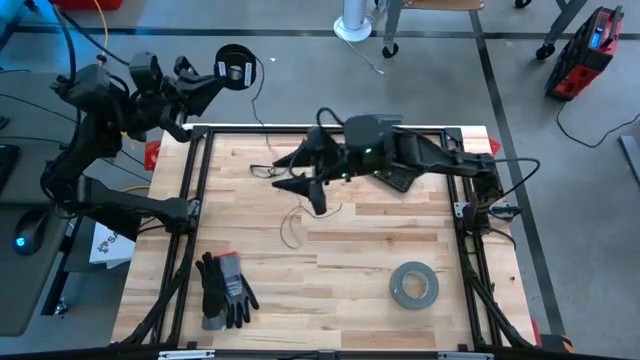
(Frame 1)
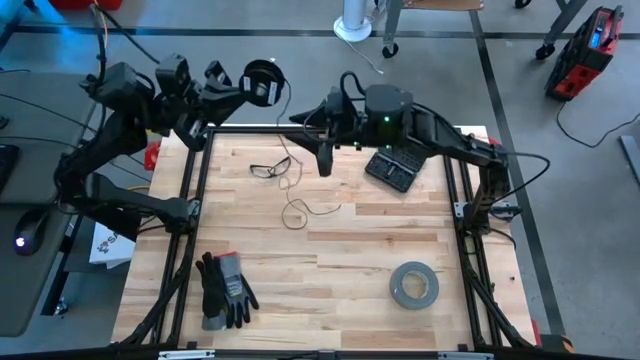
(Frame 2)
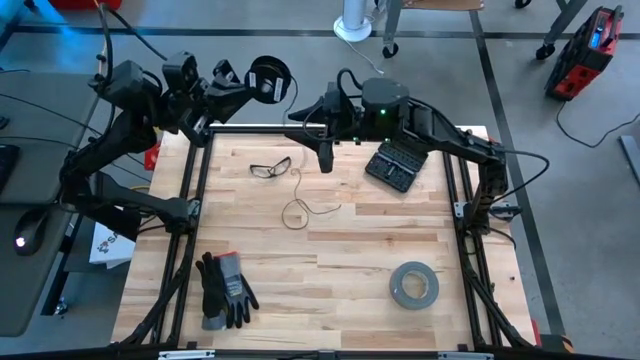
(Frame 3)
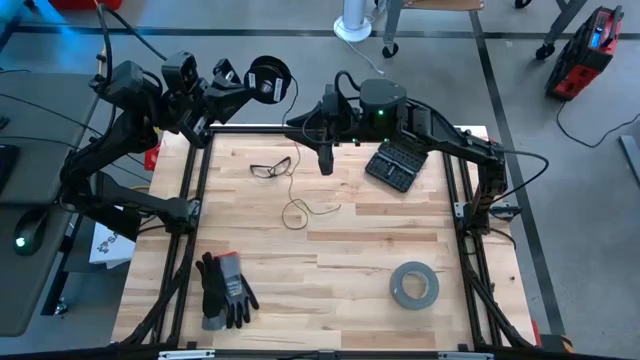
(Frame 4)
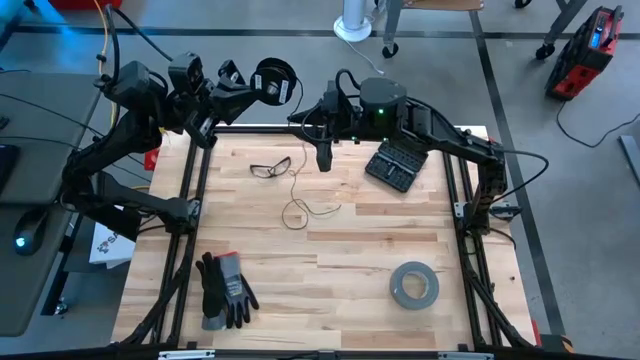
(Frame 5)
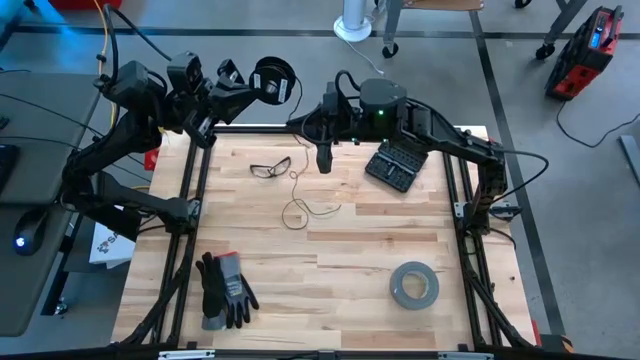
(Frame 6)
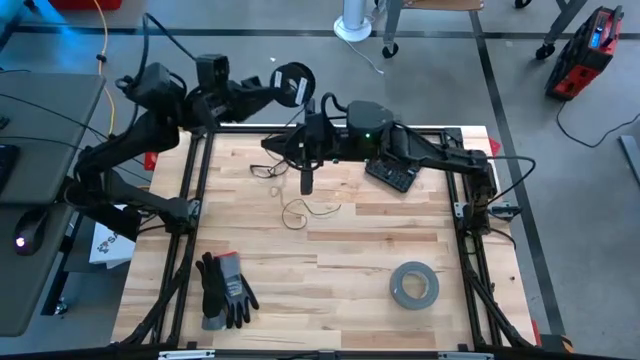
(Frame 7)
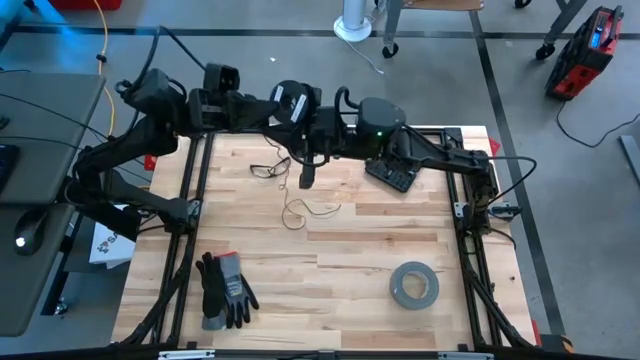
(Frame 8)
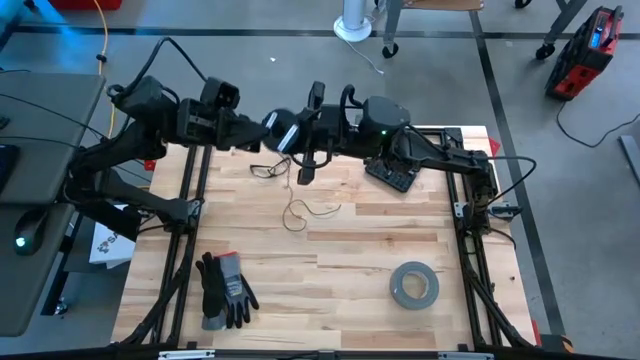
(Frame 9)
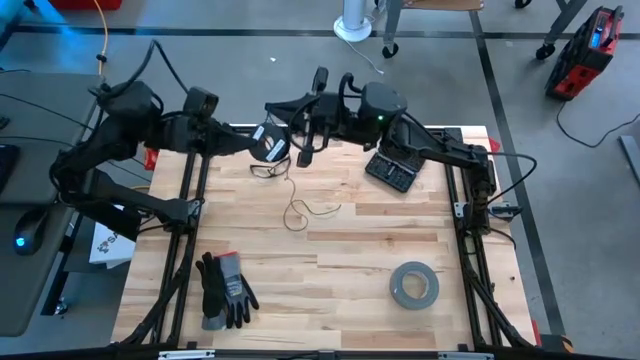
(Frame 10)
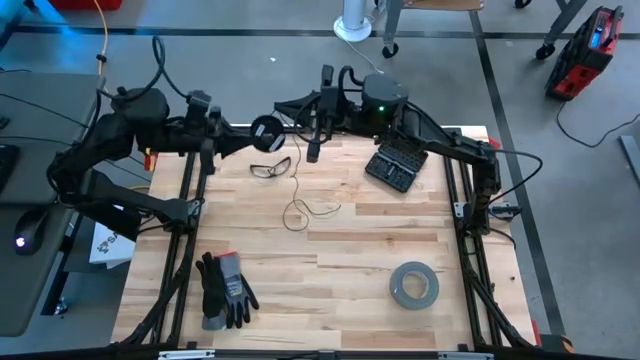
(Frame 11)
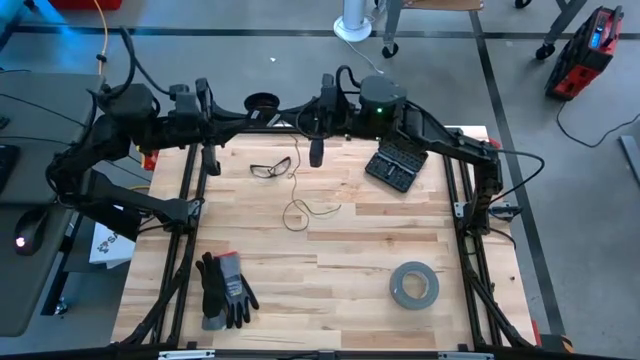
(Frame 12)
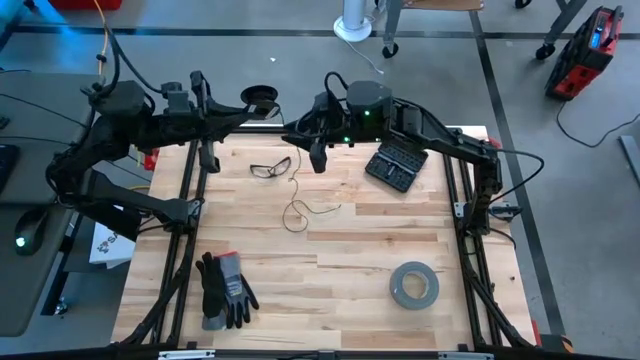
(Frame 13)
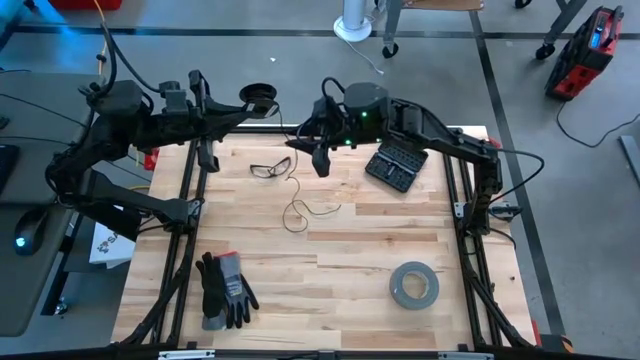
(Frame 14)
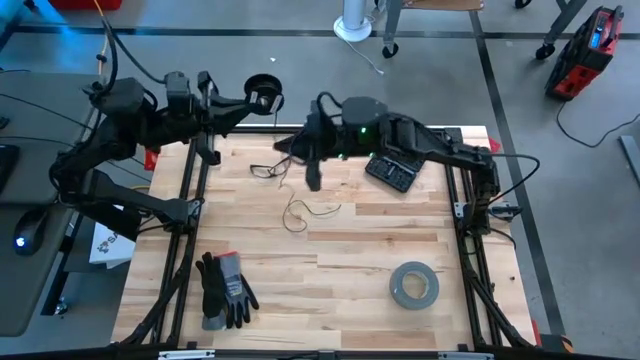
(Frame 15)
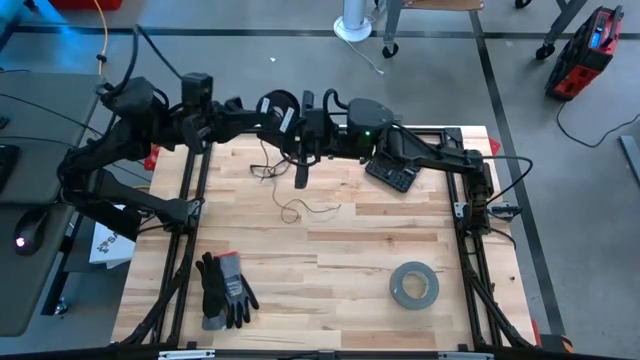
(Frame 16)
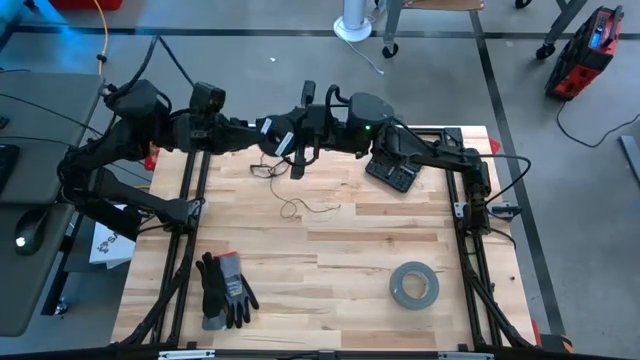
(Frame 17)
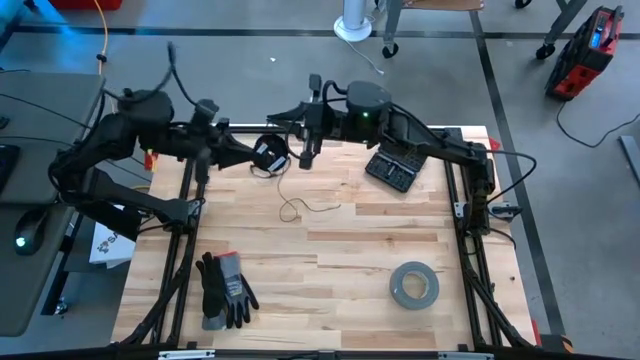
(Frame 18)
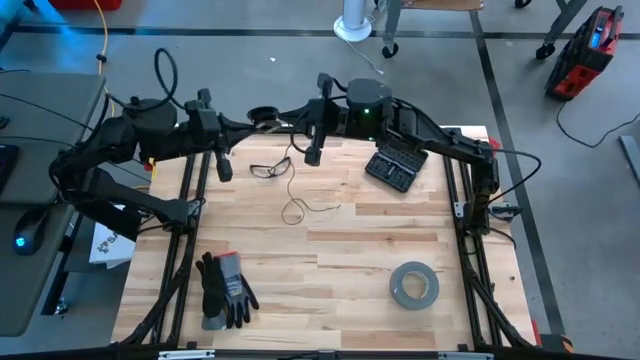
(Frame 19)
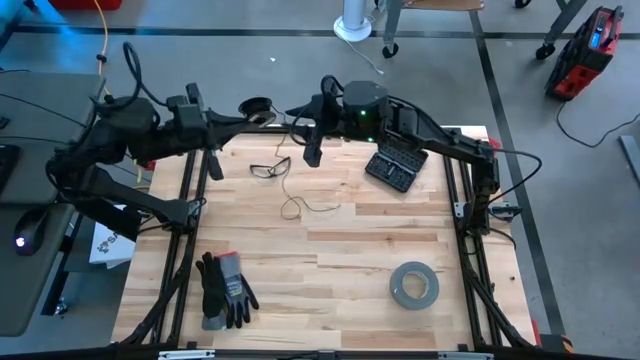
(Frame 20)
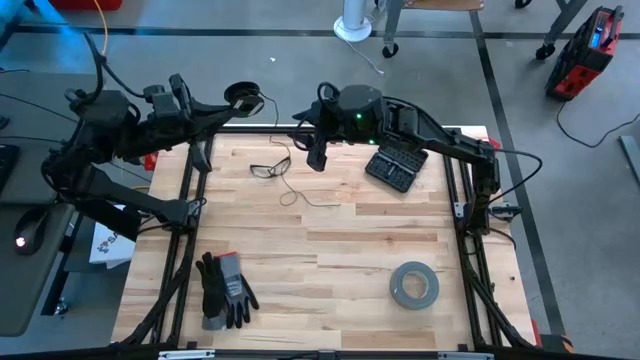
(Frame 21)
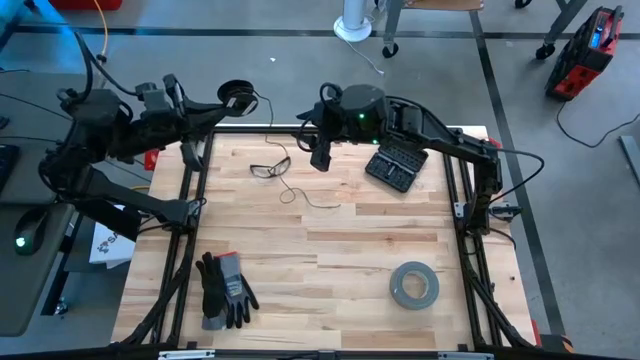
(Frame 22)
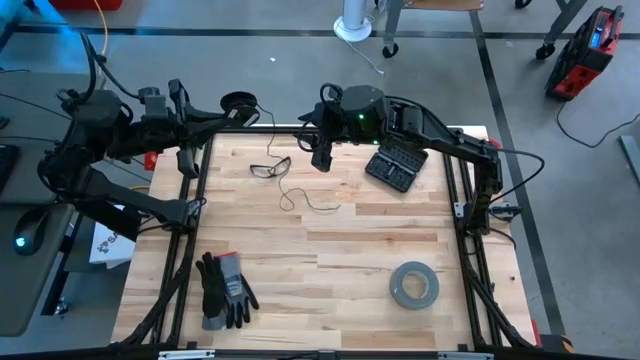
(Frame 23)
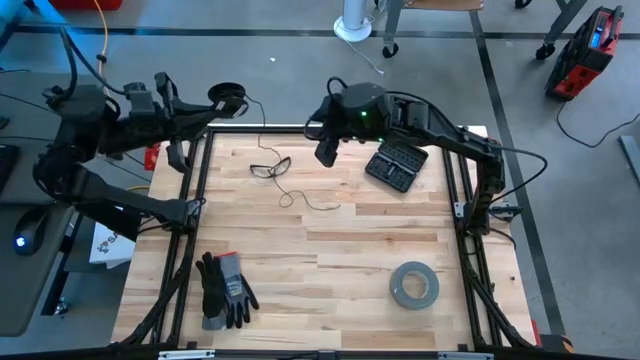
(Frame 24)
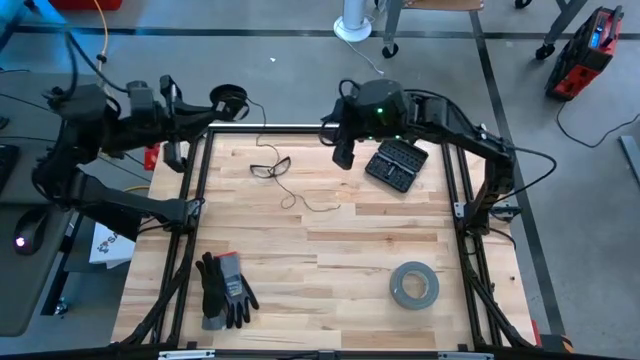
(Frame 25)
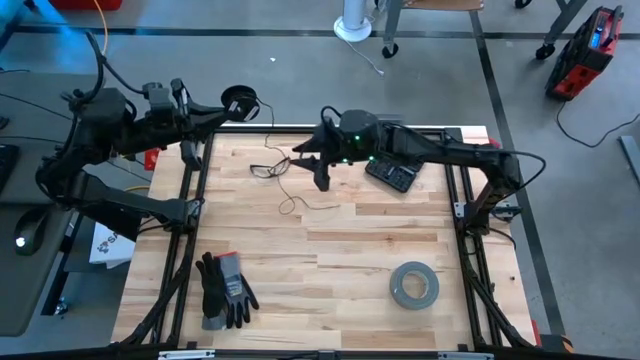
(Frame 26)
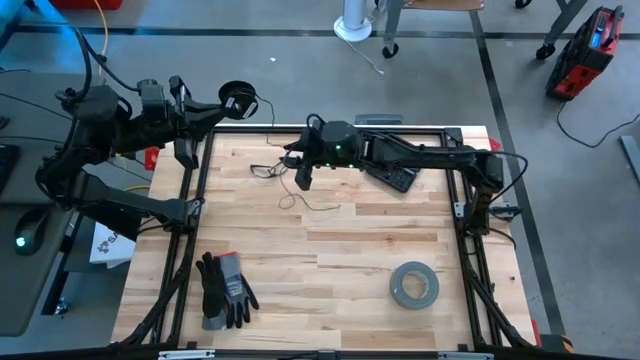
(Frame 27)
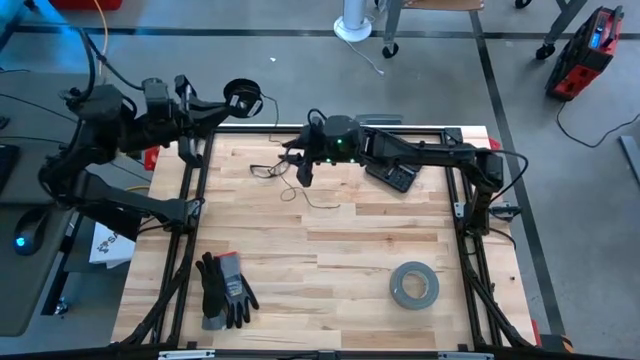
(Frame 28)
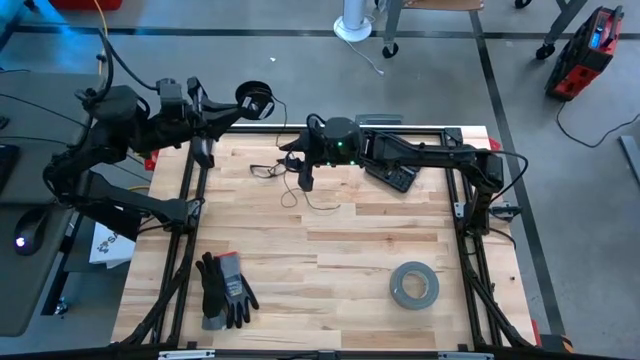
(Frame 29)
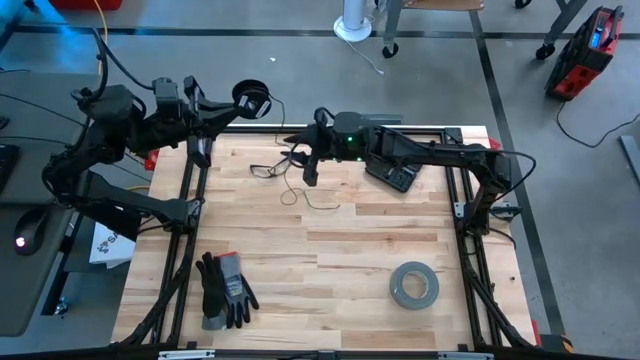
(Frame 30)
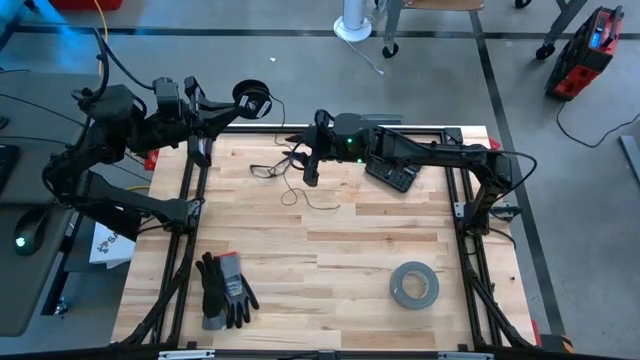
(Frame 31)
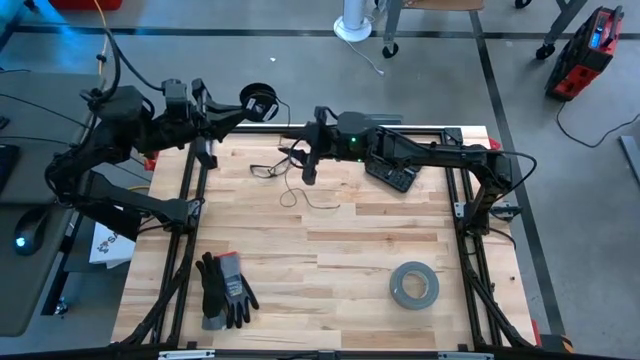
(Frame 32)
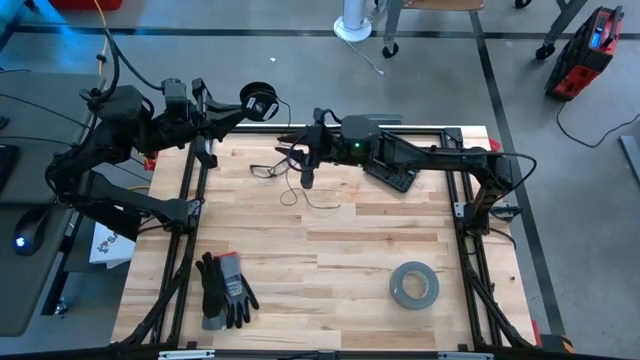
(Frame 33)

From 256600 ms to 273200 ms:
Task: Coil cords
Coil the black wire on the black spool
